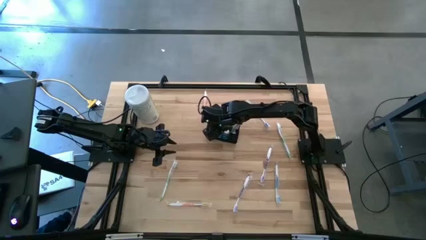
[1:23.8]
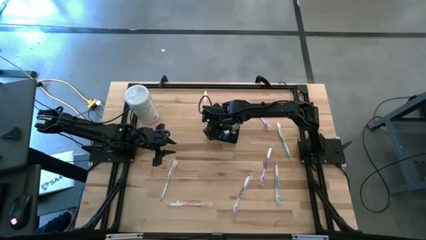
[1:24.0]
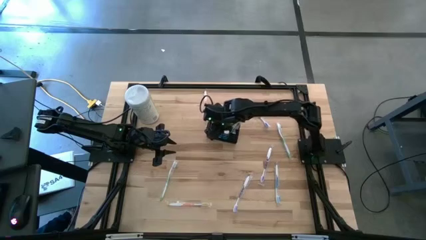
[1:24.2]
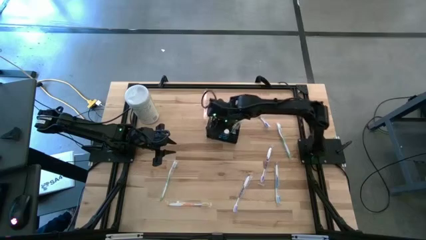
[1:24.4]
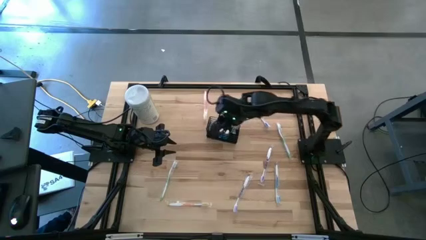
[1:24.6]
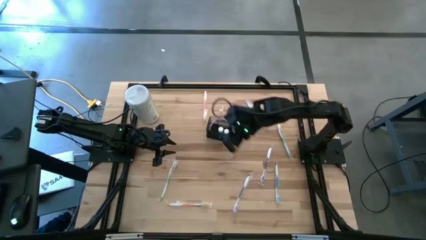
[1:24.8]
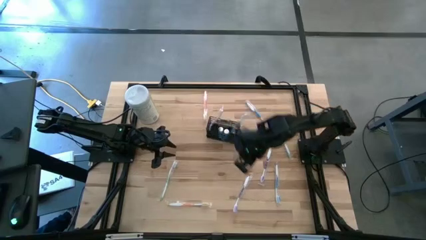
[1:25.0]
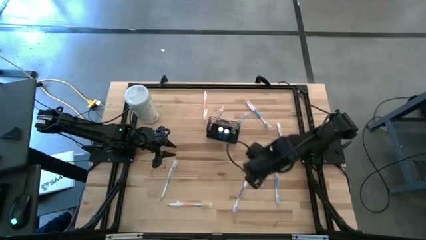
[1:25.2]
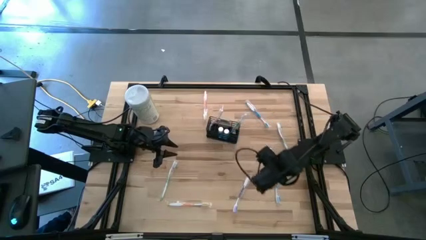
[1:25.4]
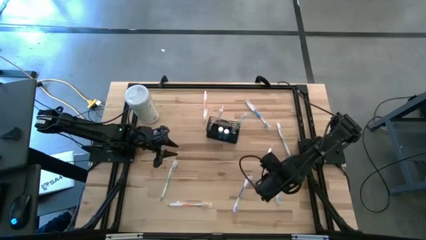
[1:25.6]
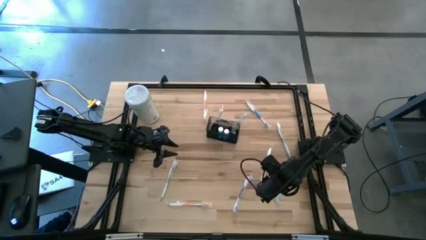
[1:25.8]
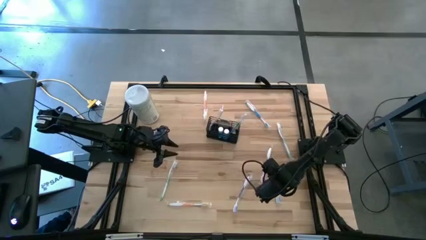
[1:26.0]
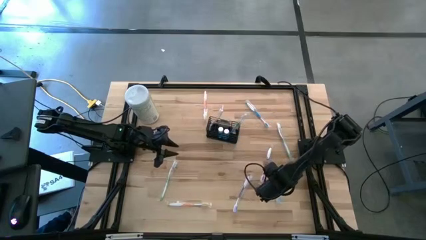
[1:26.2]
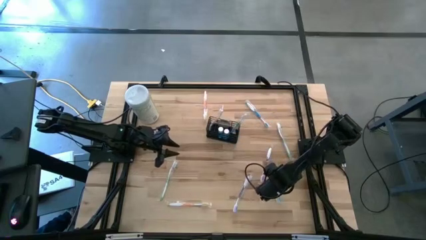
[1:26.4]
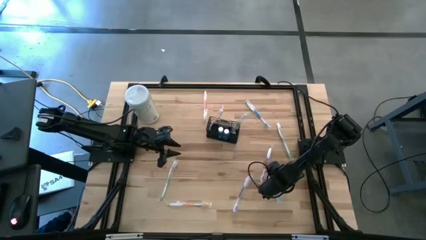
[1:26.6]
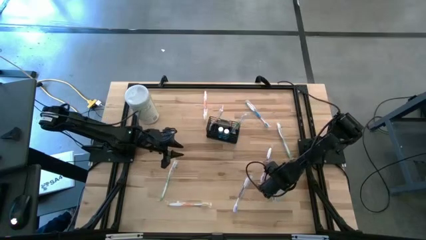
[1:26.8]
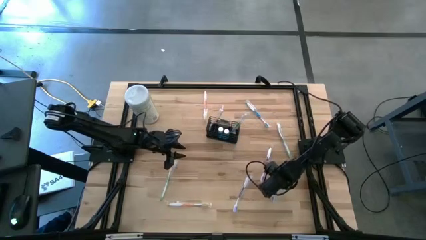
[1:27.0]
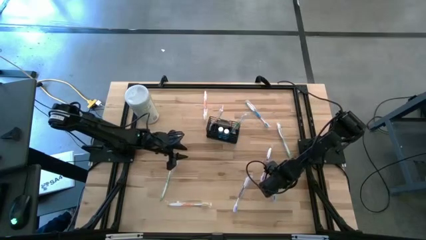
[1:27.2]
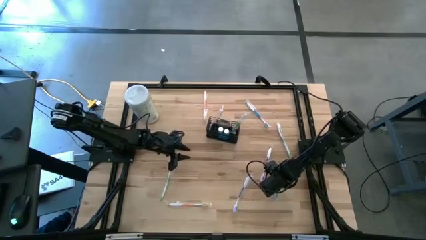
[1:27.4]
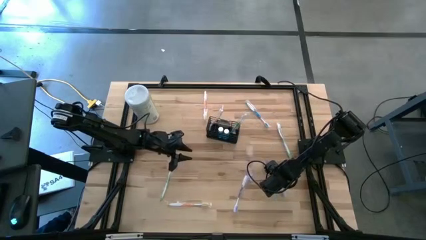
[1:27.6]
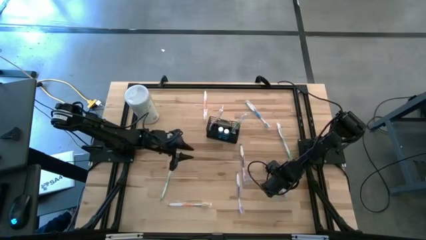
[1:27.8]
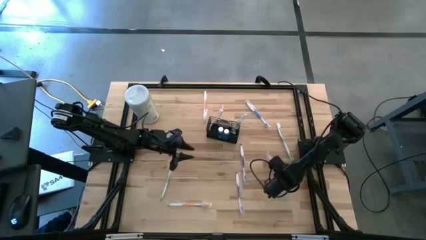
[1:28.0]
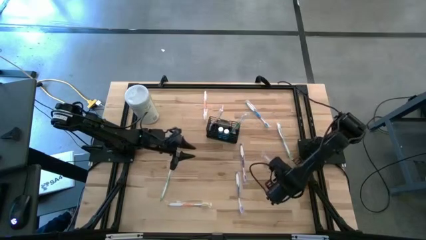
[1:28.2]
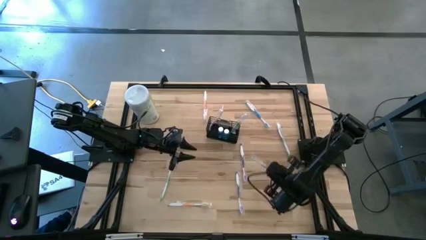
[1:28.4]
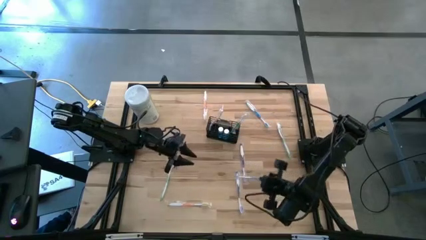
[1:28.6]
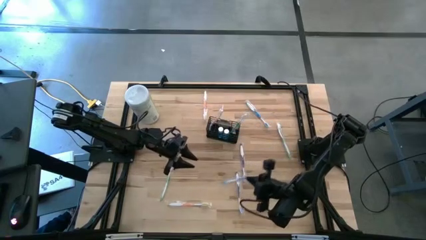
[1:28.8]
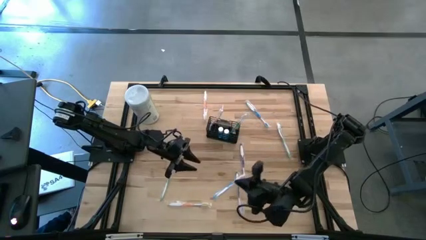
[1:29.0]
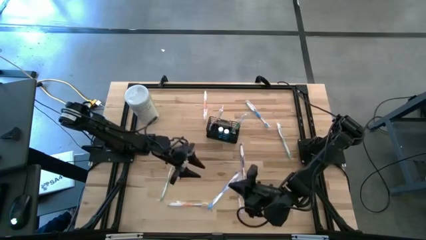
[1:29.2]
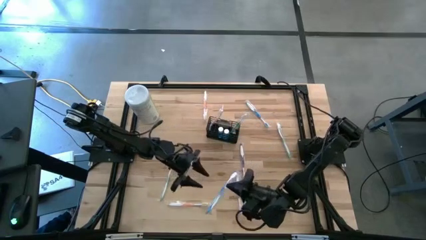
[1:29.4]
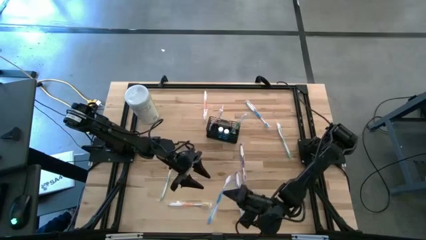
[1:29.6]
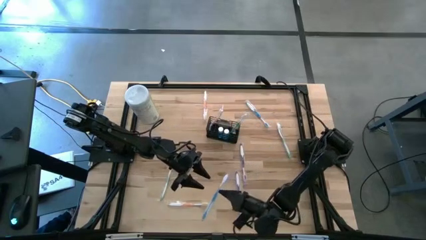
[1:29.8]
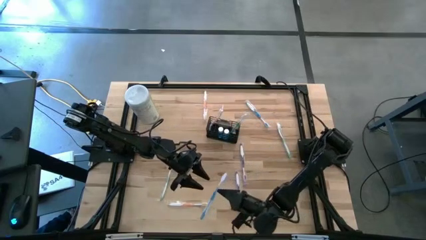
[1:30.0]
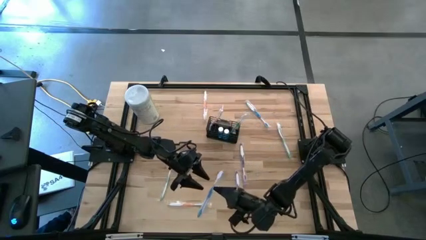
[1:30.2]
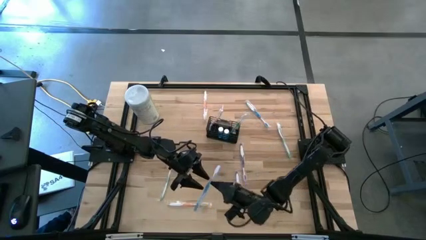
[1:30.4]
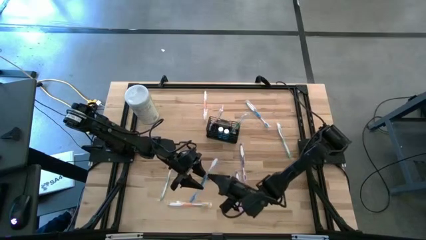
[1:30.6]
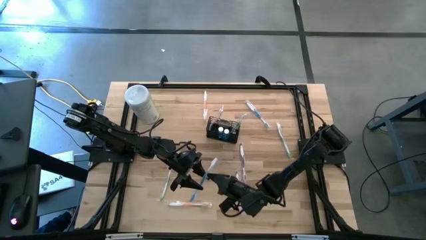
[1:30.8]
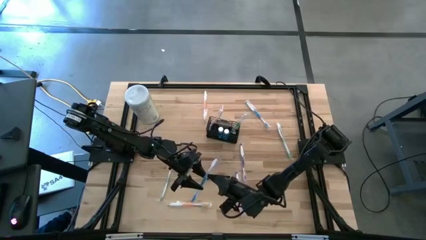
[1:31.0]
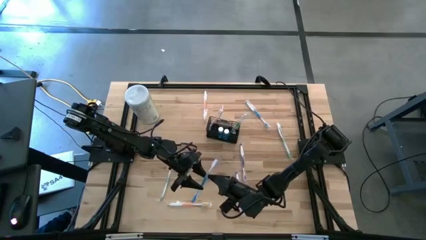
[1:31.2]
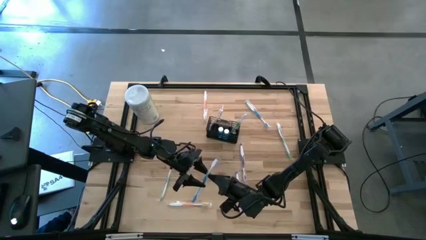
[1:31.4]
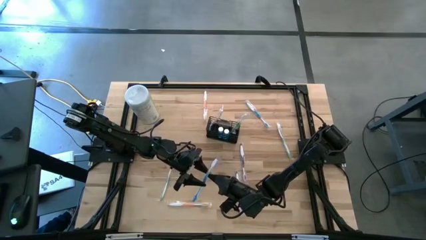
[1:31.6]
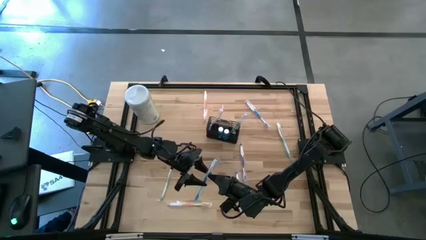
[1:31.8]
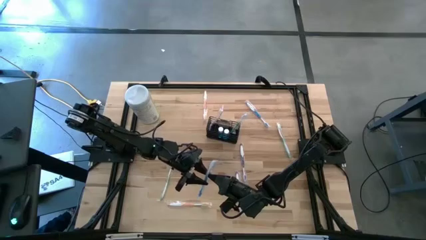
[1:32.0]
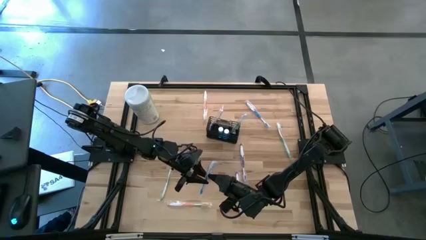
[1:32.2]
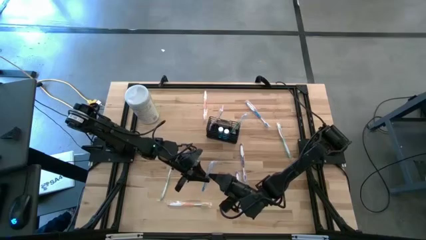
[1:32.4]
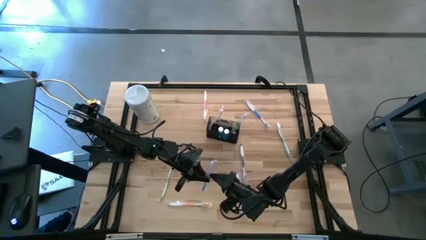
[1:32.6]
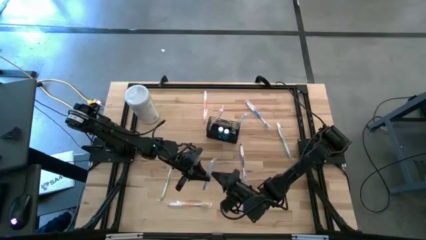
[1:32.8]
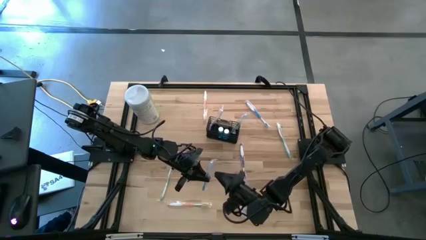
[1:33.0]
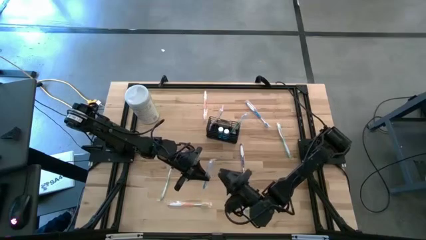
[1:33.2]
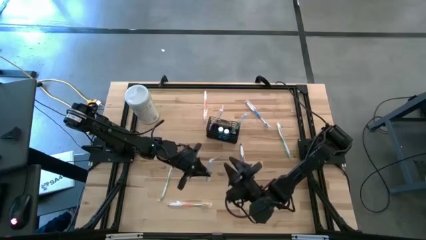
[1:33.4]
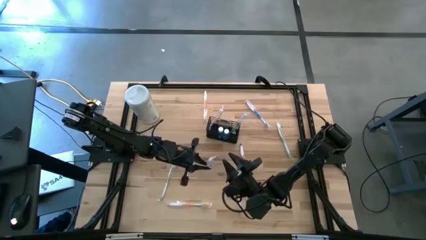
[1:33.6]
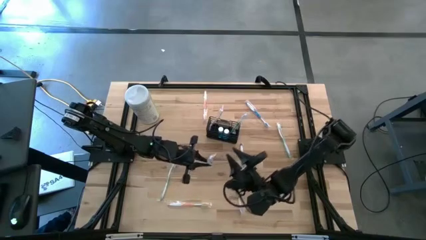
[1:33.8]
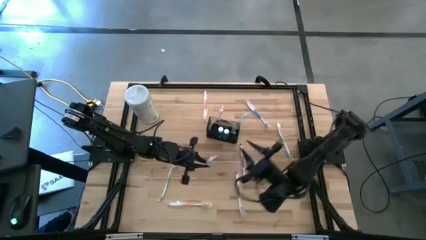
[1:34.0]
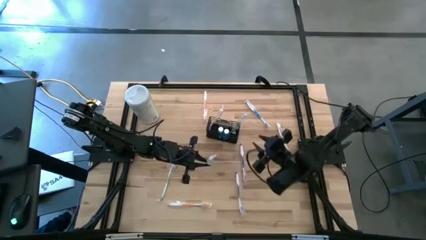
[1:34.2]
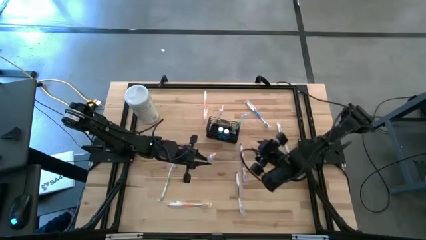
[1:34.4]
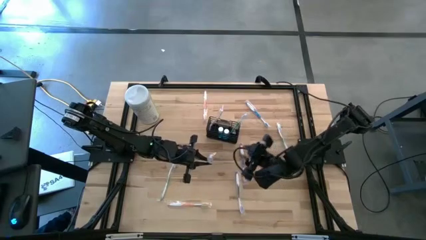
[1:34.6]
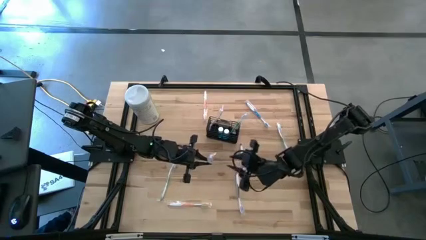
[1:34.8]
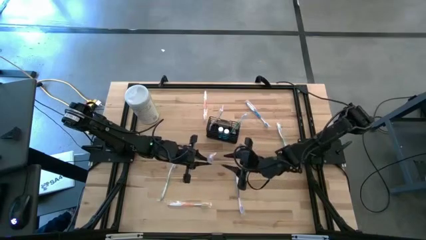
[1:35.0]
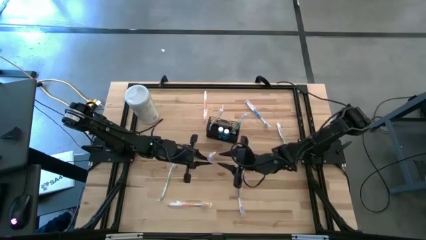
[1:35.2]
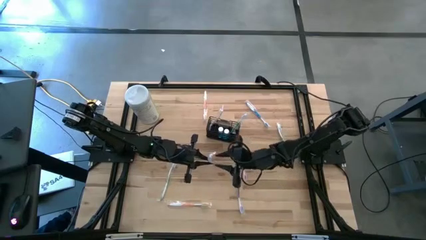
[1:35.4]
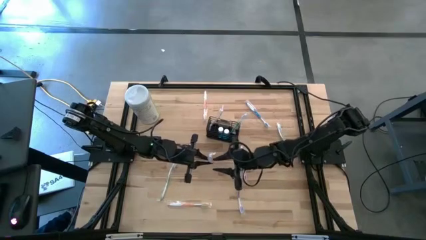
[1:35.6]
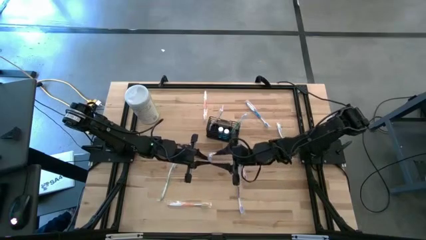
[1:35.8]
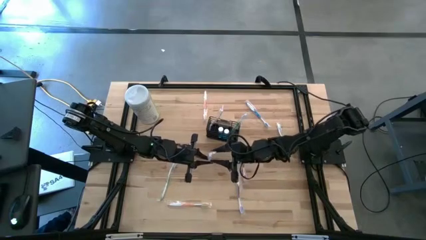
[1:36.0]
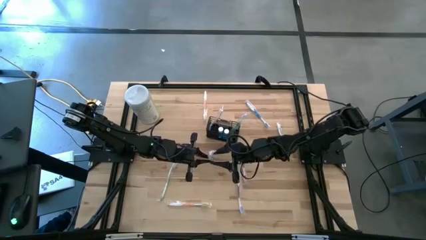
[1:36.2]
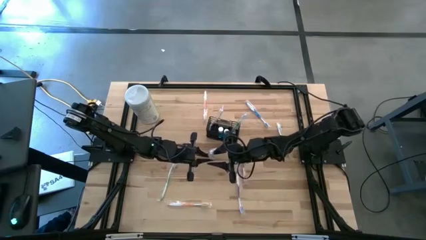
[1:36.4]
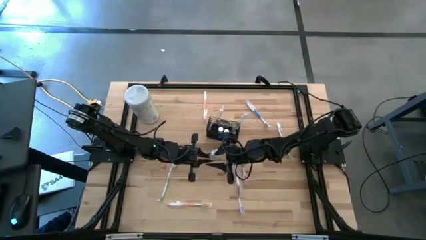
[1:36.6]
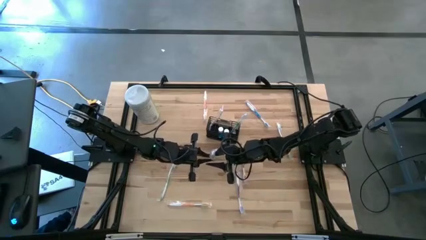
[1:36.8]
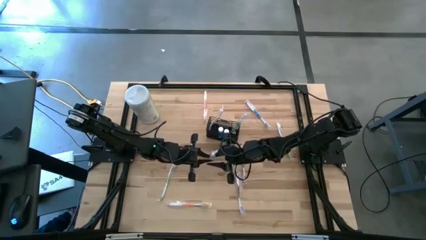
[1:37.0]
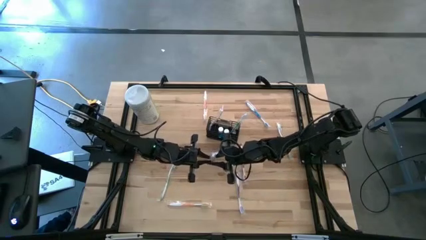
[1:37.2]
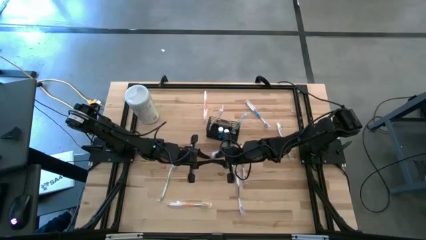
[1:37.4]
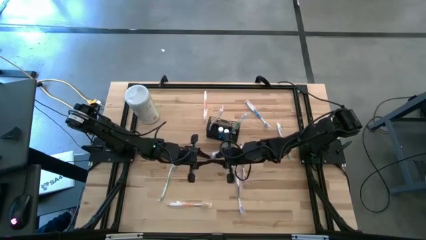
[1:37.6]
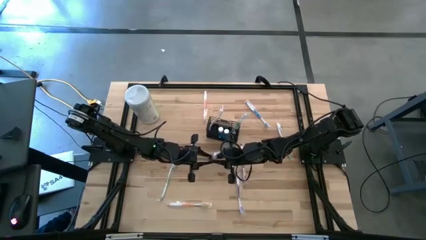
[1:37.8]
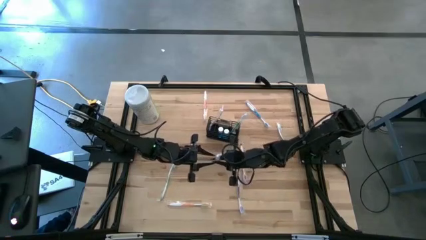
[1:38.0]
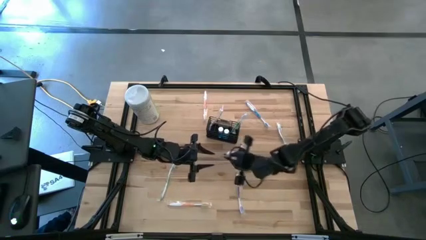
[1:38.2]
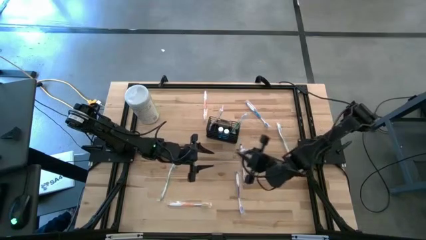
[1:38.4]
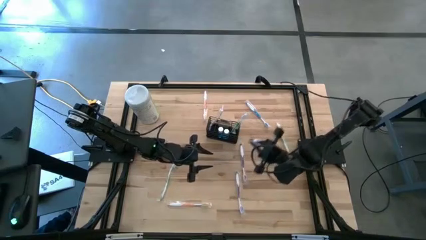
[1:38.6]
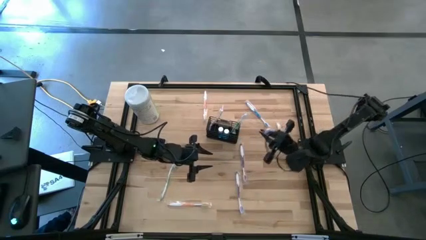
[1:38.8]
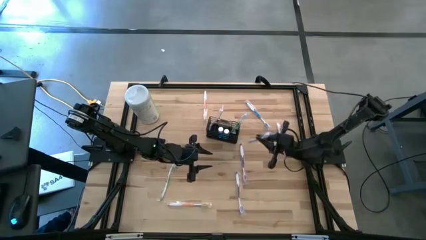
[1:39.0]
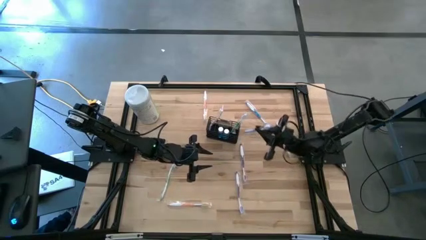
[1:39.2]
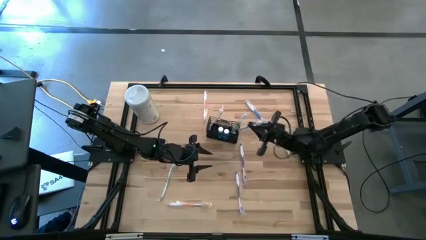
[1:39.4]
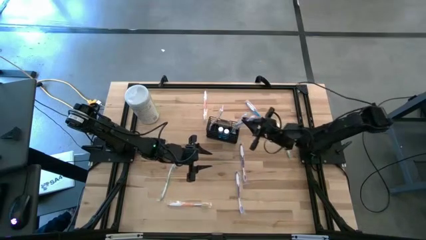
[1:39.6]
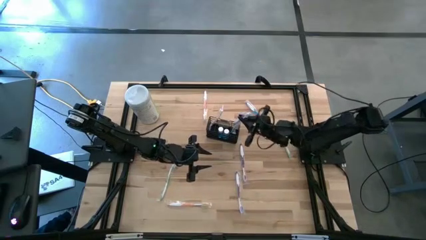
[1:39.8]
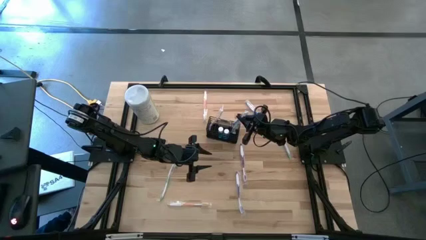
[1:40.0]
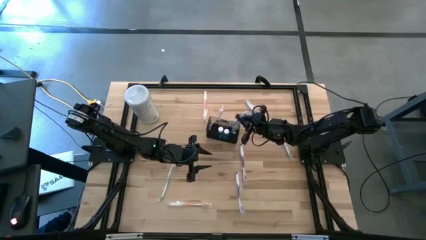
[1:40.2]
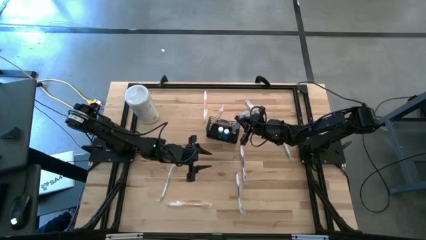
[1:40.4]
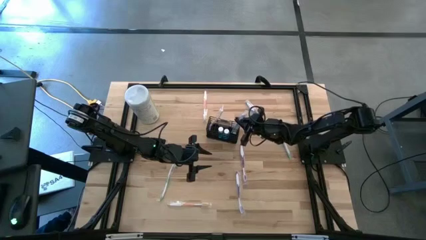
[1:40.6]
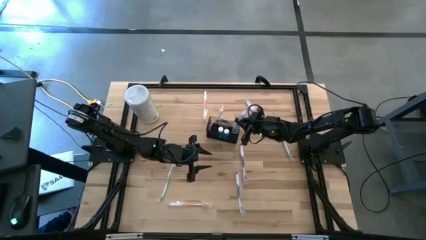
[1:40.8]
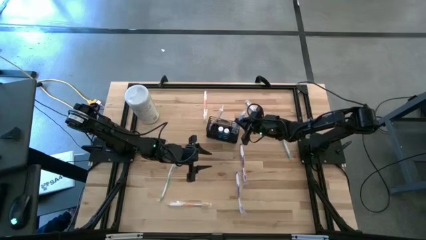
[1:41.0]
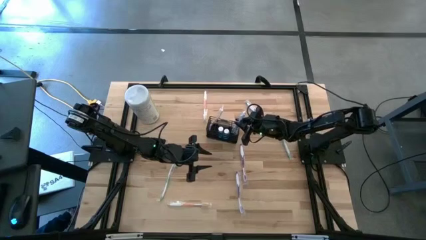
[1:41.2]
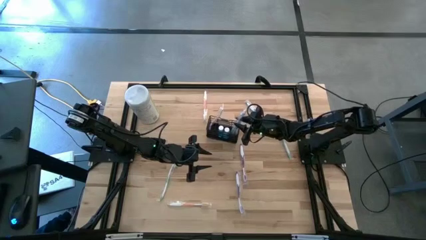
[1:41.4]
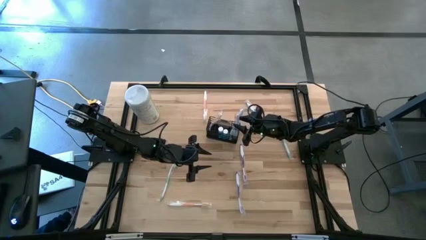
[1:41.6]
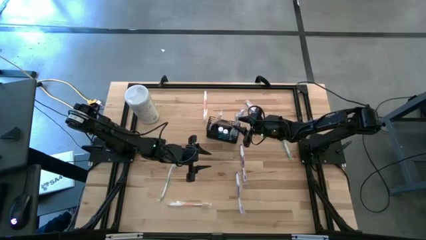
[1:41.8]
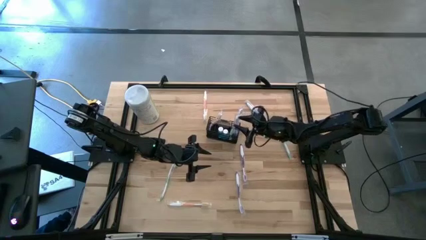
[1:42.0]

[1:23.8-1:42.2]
Task: Pick & Place toothbrushing station
Put the bottom blue toothbrush into the mesh organizer
